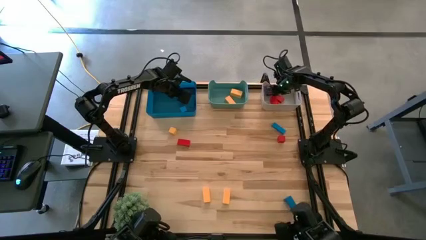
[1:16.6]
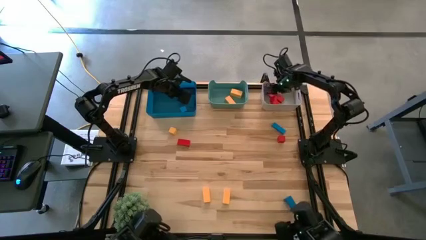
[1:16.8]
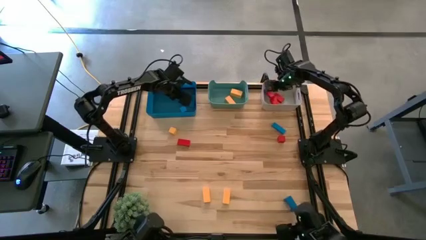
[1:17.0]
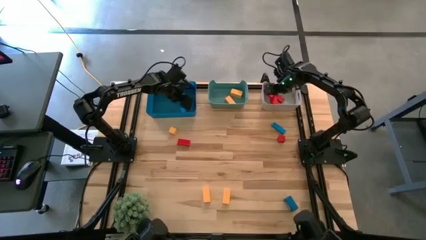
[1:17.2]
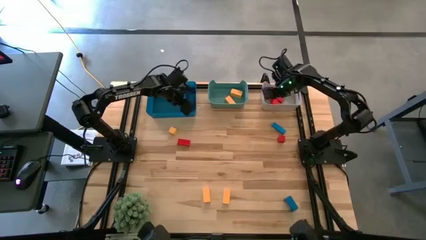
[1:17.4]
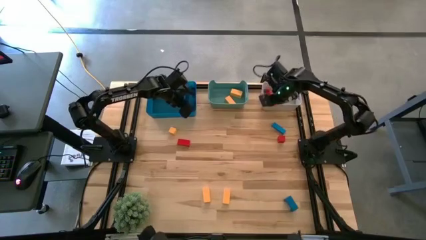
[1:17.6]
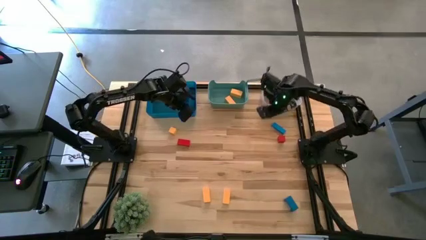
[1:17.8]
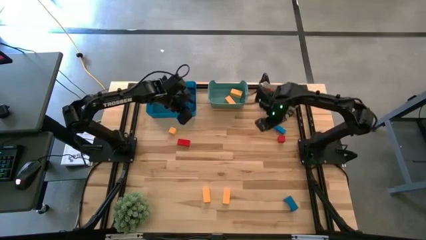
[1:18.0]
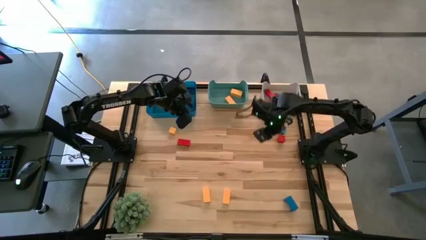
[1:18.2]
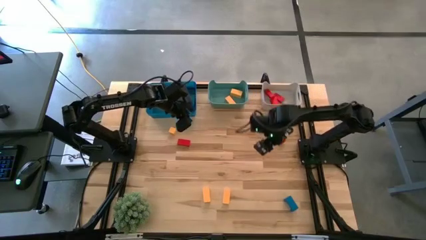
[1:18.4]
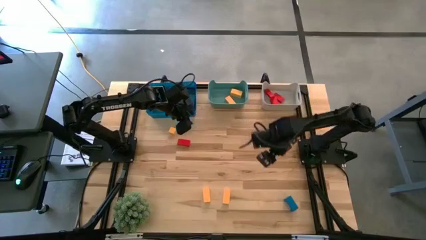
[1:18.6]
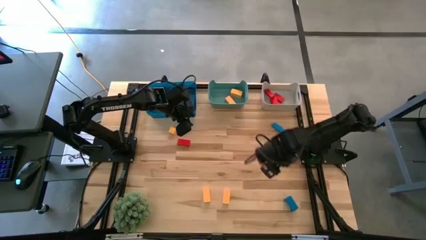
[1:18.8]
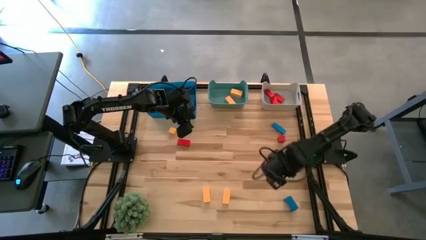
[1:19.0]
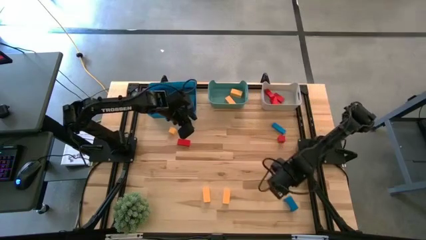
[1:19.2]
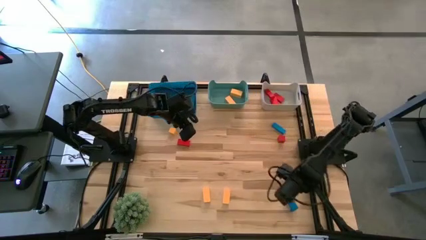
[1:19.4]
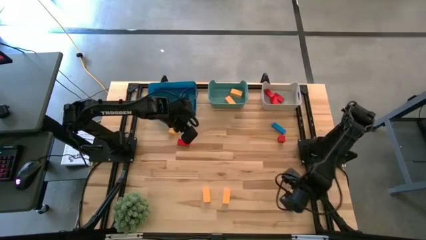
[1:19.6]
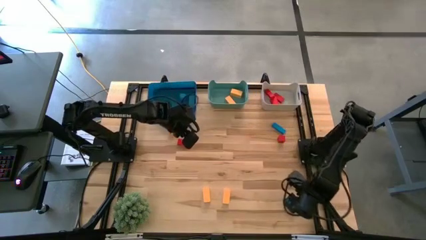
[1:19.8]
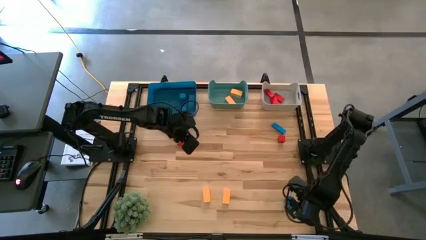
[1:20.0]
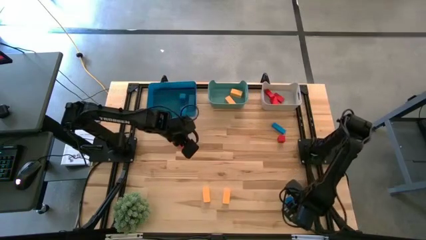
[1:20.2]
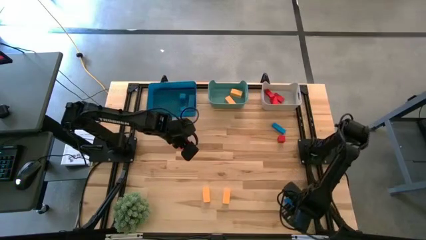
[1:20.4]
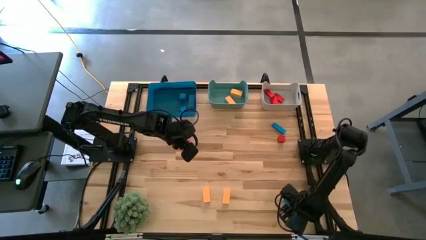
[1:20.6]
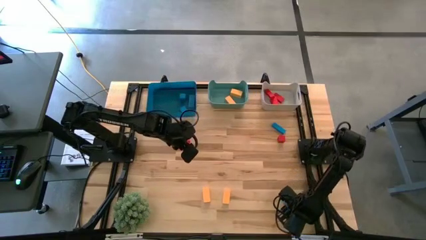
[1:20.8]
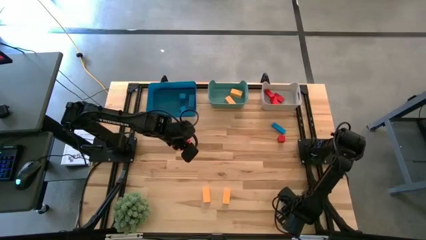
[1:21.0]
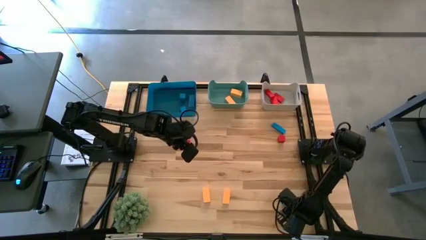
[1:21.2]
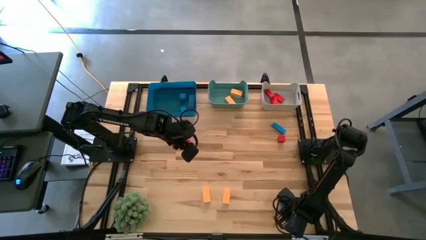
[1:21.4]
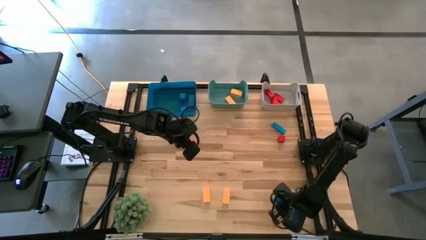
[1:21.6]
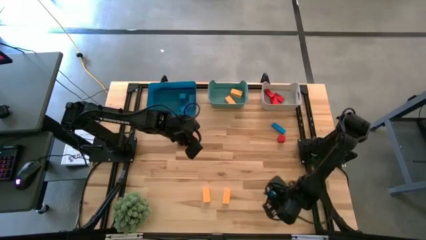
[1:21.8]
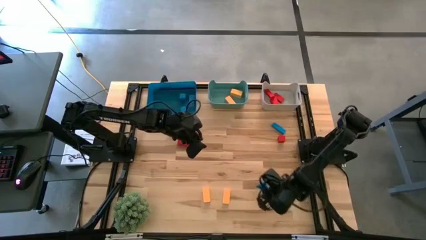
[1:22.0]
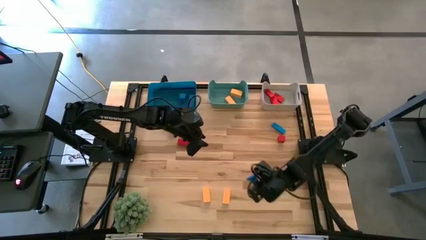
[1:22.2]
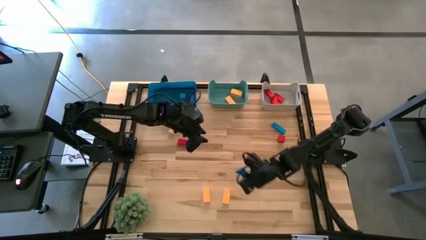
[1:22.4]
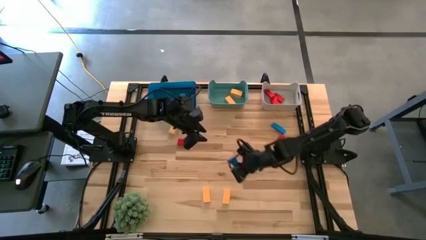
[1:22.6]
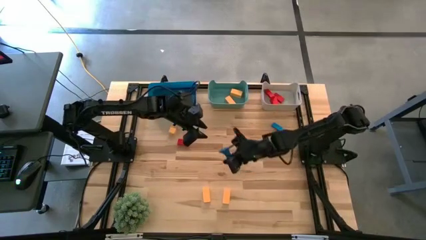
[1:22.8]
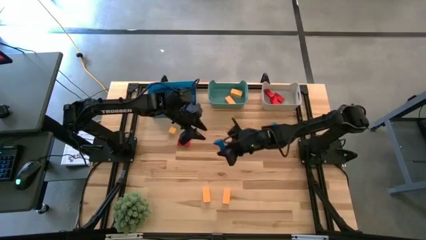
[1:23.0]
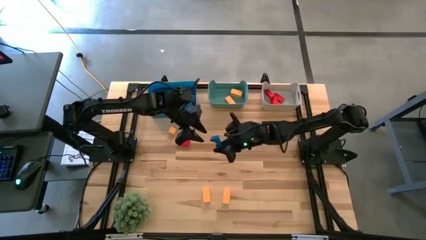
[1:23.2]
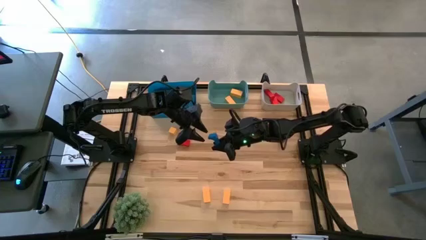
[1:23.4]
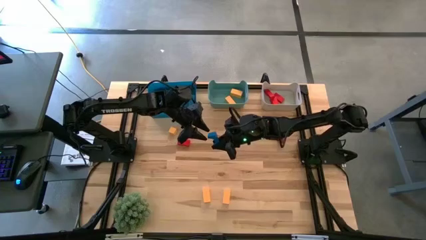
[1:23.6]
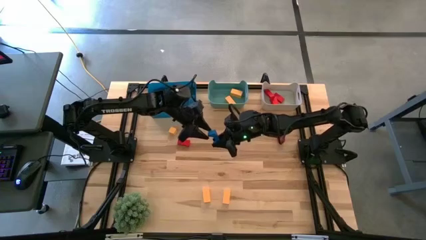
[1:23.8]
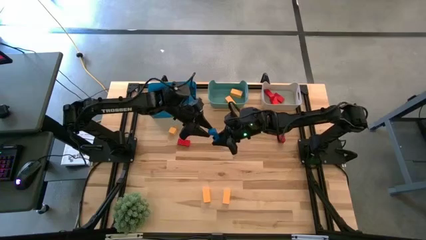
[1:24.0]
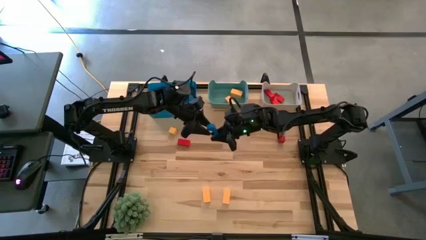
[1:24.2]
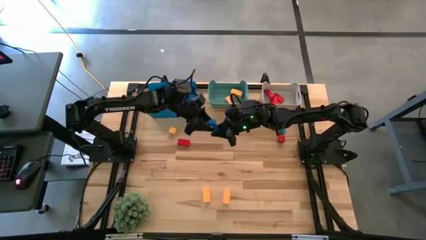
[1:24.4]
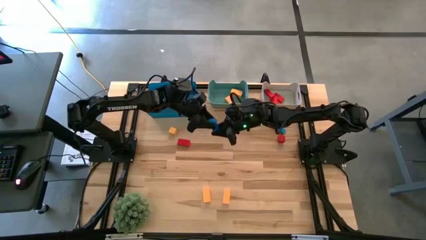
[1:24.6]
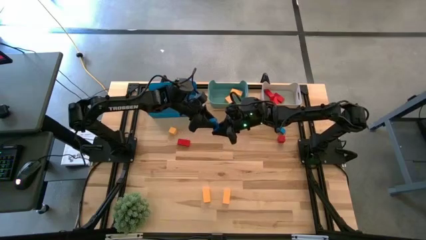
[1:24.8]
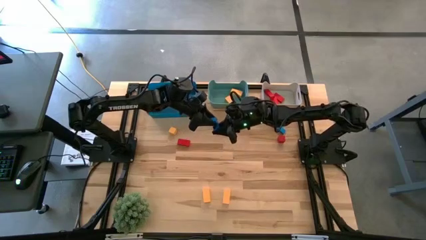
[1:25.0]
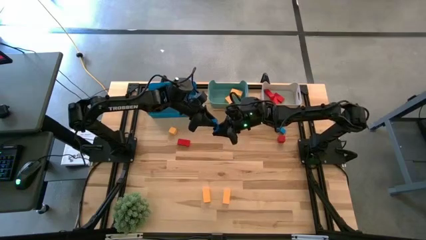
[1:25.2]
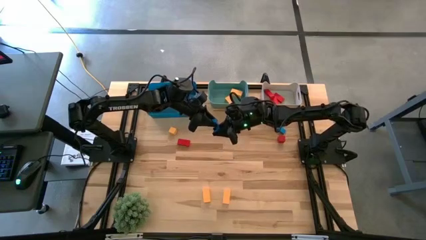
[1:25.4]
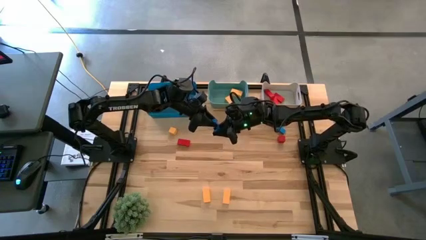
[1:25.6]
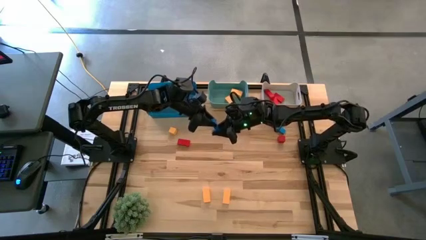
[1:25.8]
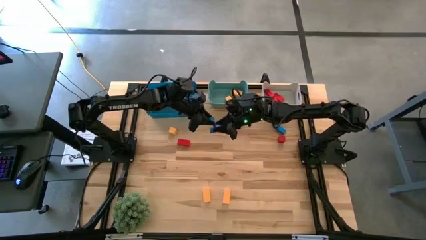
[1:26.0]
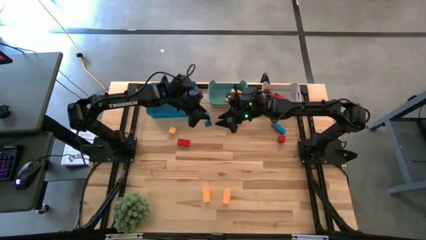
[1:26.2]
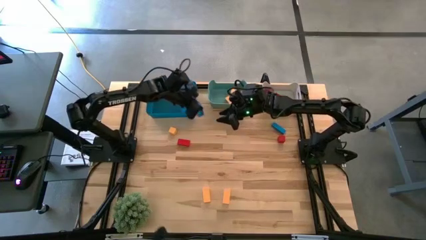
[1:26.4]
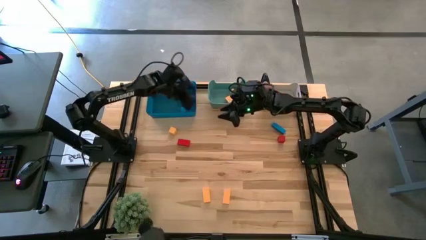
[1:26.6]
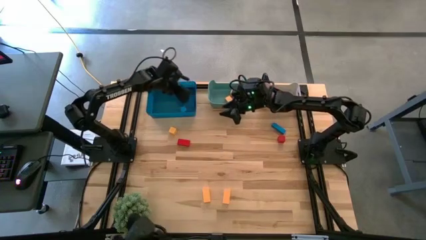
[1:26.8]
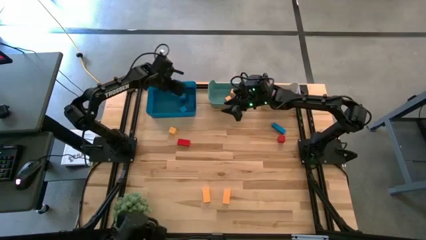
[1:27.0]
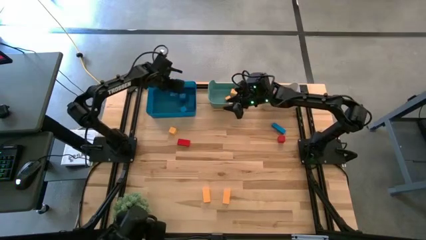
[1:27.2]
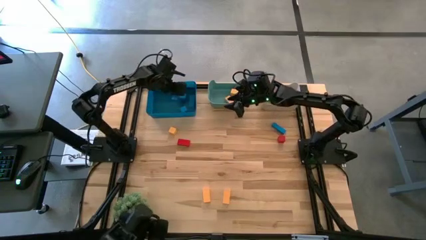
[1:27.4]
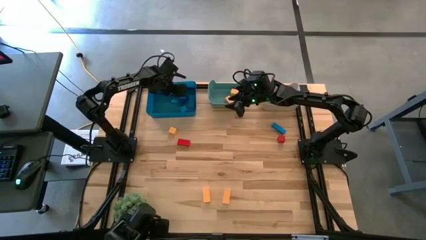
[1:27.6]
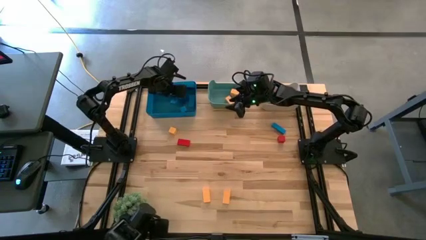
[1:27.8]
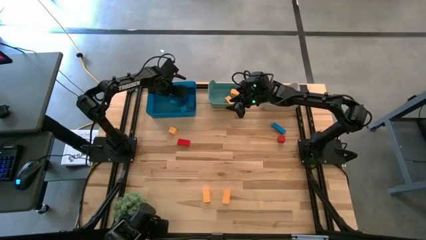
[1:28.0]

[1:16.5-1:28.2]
Task: Sort & place blocks by color
Put the blue block into the blue bin

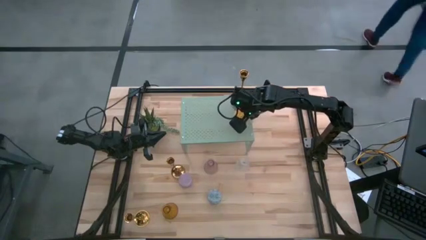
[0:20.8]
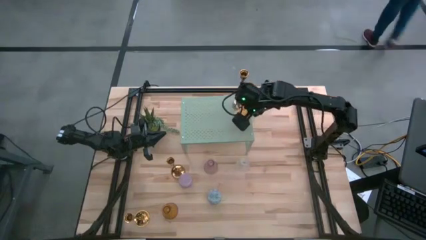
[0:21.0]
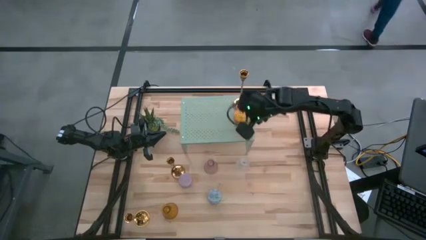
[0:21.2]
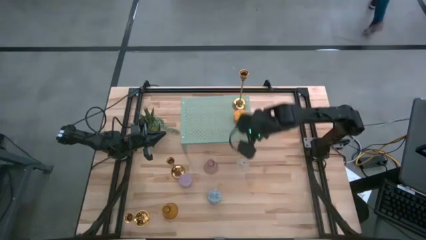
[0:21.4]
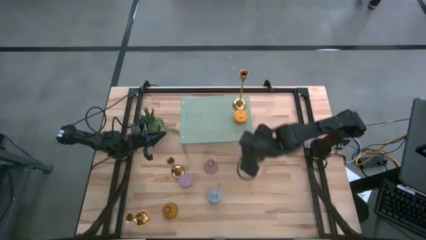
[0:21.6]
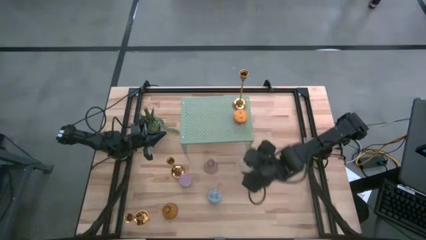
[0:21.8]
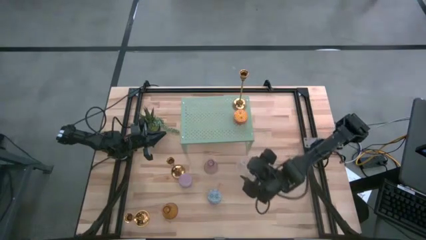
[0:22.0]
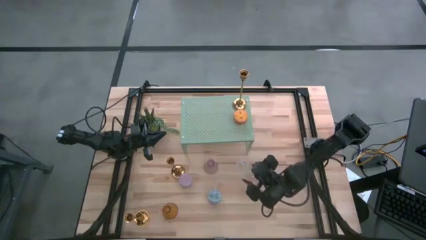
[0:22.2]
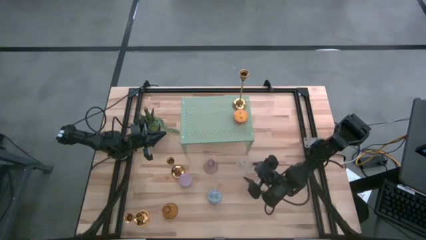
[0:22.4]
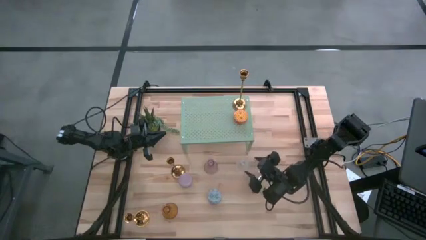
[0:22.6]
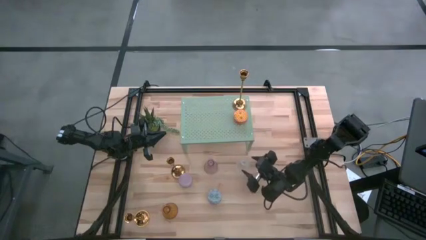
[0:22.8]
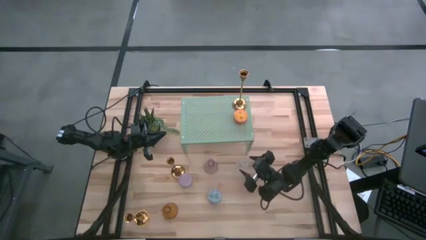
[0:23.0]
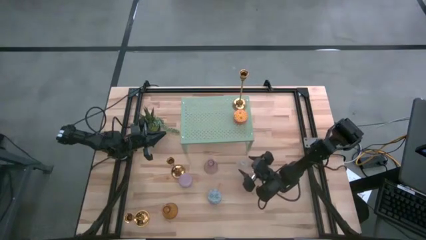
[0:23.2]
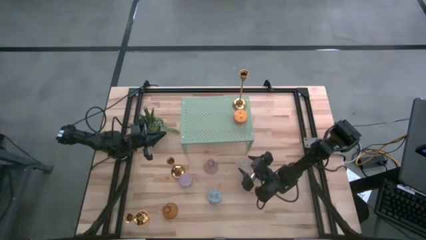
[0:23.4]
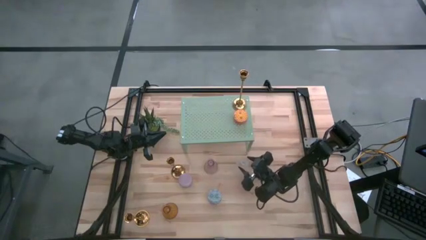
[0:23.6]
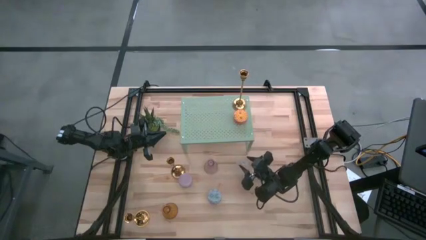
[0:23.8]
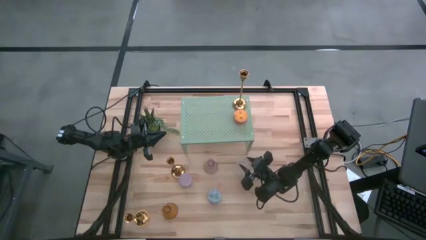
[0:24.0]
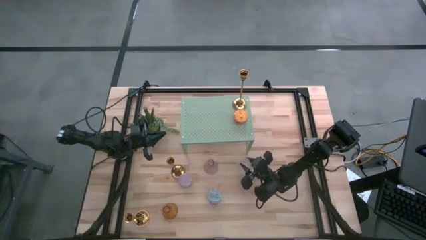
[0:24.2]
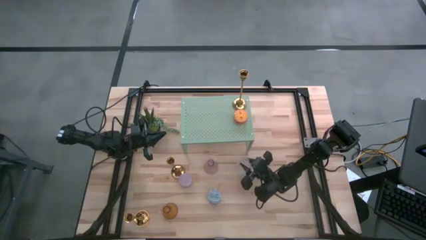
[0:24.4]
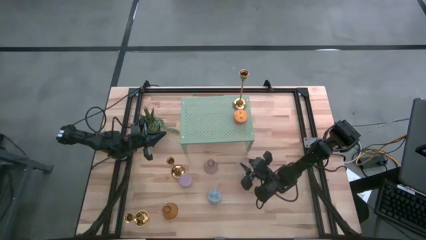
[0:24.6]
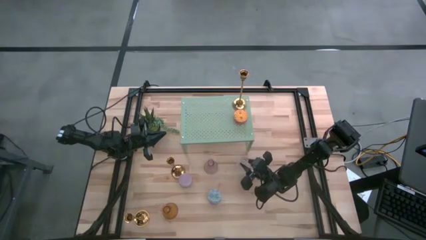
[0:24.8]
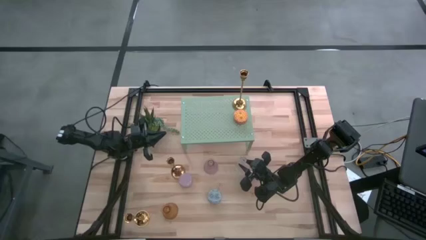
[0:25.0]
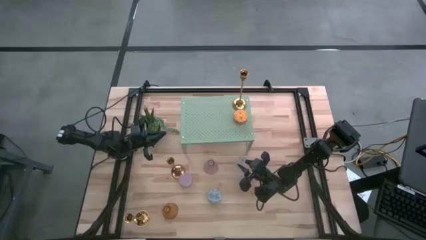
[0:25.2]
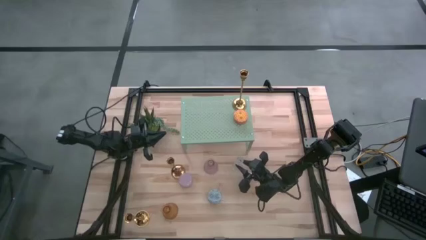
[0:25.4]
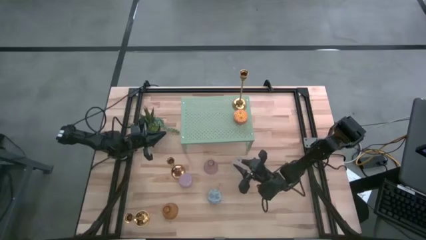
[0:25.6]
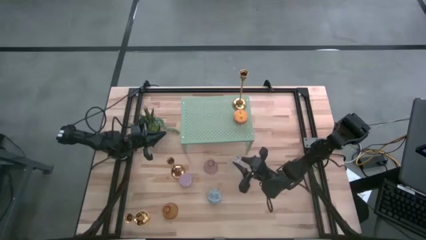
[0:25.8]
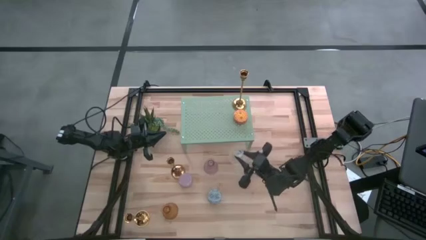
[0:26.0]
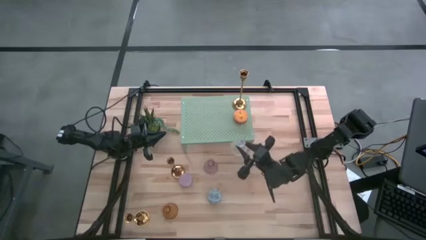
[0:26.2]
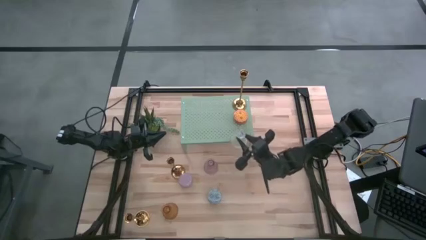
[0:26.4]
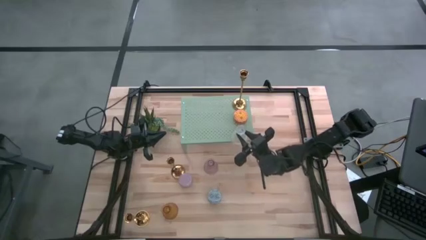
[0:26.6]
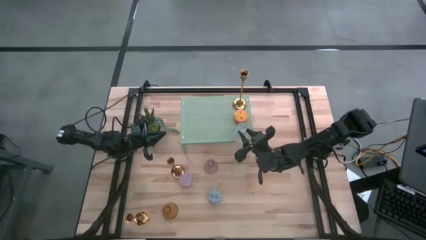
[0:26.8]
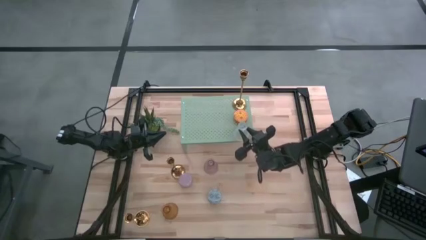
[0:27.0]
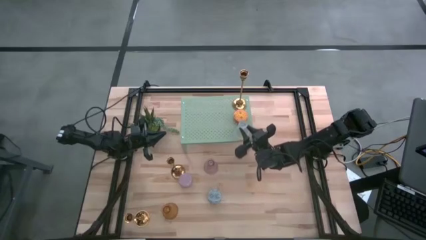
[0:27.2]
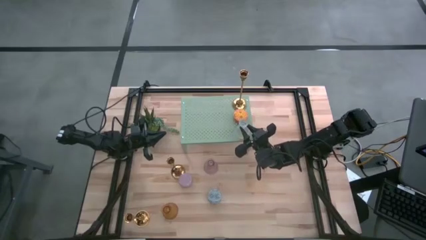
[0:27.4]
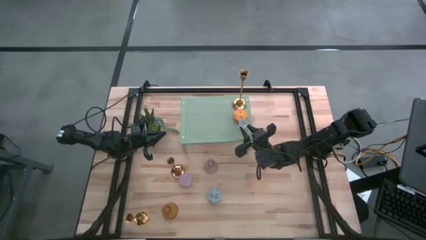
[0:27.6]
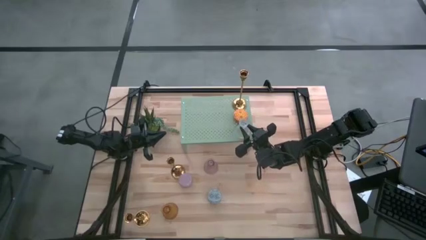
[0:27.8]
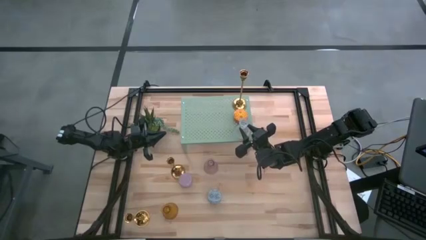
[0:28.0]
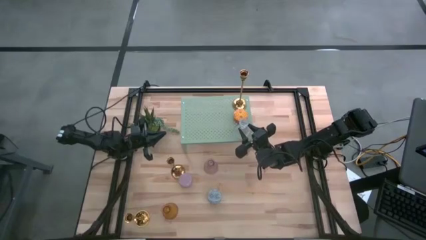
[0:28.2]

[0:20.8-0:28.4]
Task: Pick & Place candle stick holders
Put the glass candle holder on the shelf
